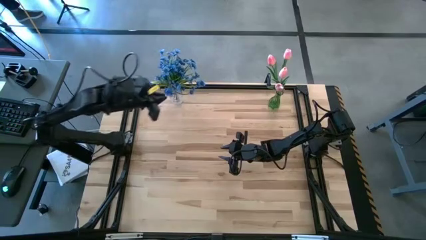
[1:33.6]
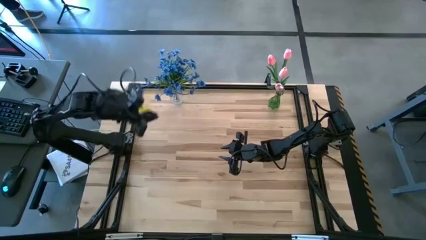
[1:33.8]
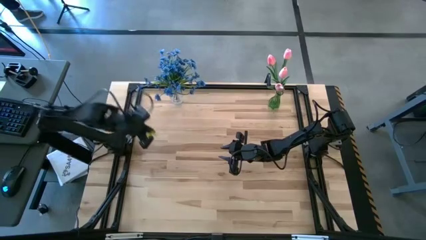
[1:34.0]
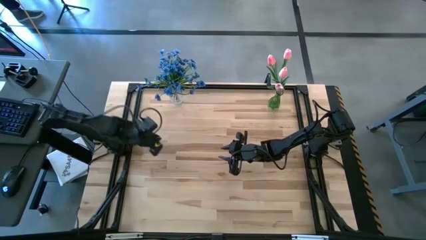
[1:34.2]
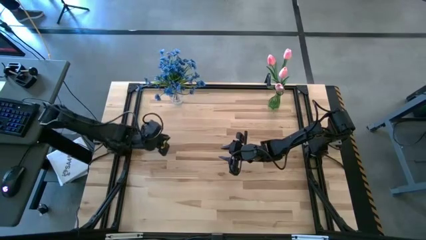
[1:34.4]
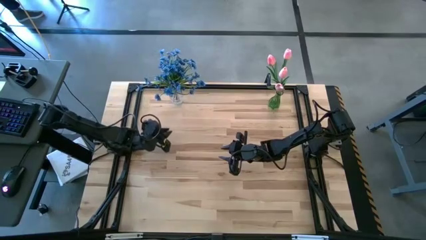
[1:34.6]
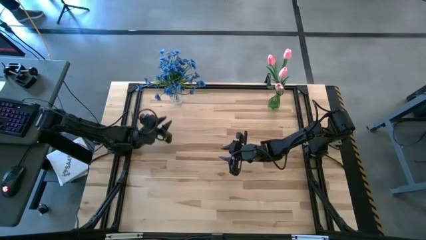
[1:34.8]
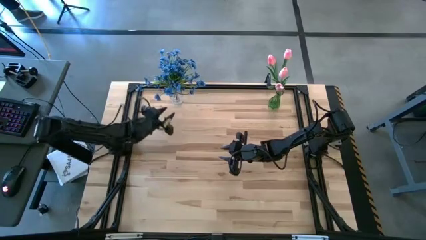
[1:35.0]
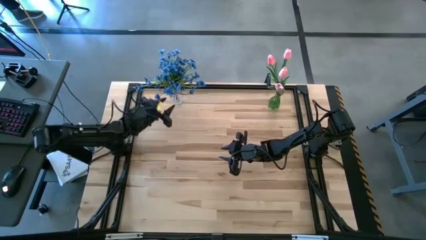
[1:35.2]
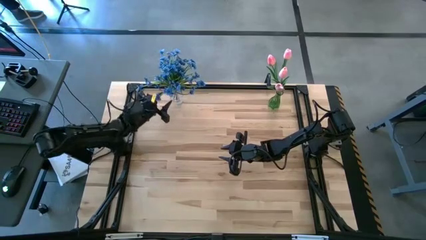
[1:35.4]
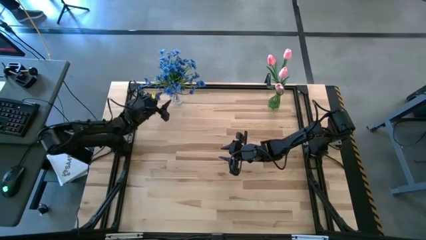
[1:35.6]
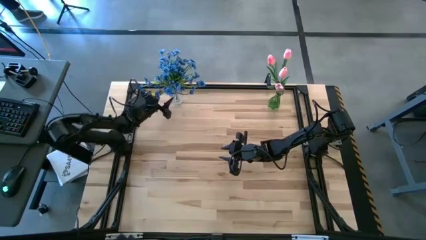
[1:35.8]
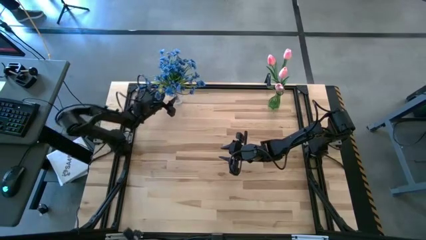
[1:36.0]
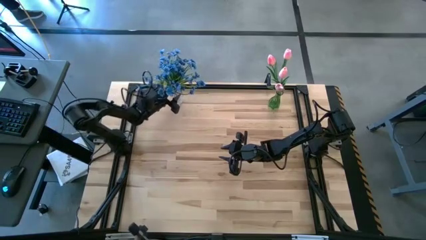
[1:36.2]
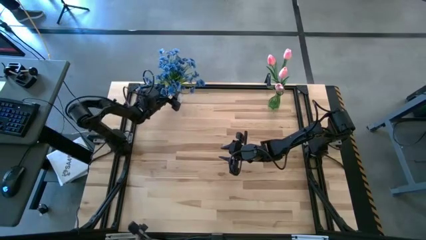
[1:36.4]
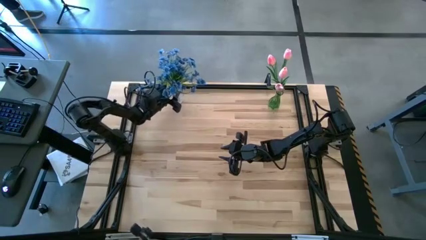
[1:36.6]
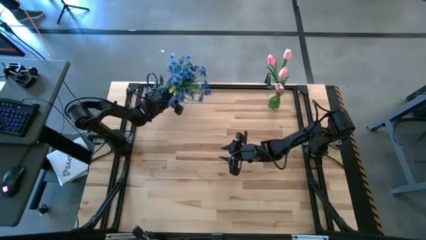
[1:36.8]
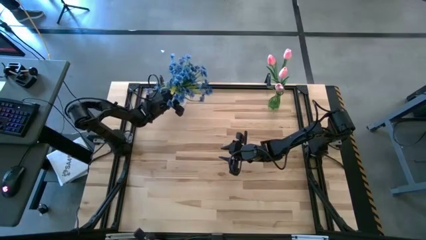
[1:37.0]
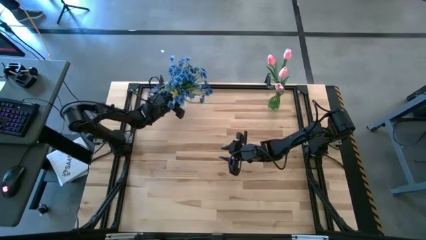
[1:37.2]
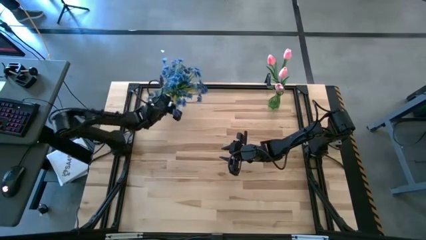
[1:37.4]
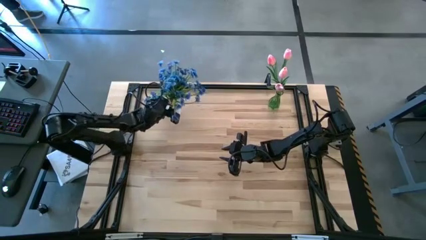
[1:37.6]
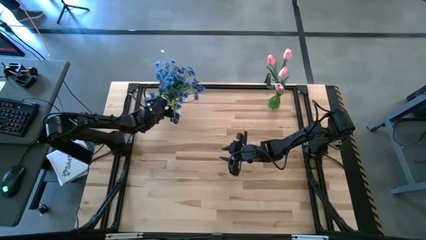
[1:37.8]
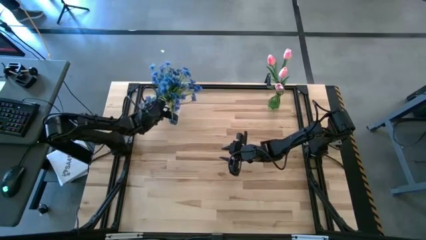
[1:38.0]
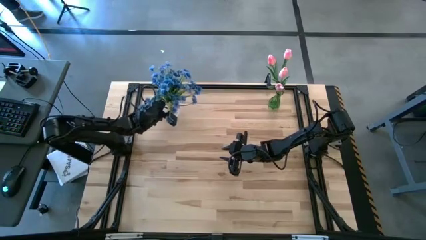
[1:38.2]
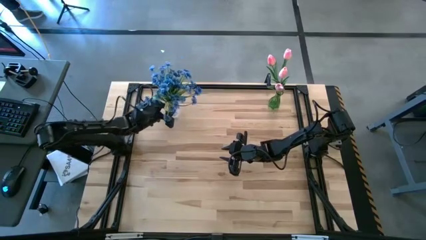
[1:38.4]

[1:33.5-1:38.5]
Task: Sort flowers into vase by color
Adjust the transparent vase

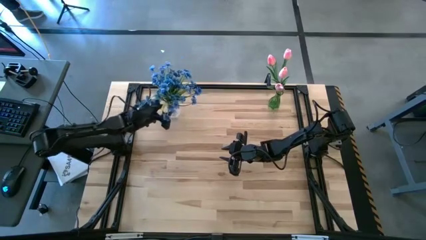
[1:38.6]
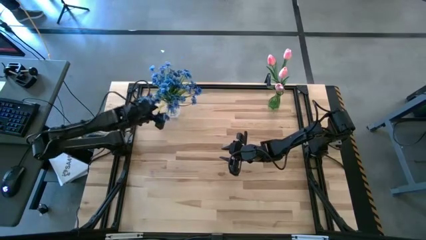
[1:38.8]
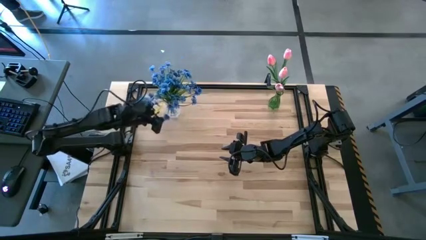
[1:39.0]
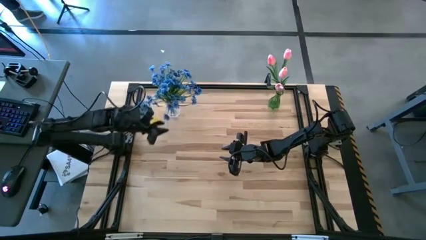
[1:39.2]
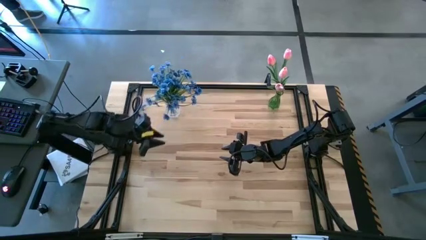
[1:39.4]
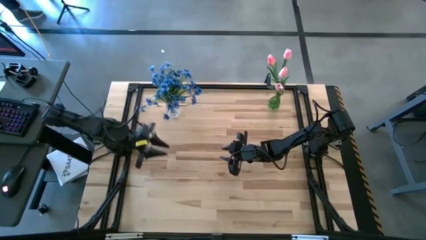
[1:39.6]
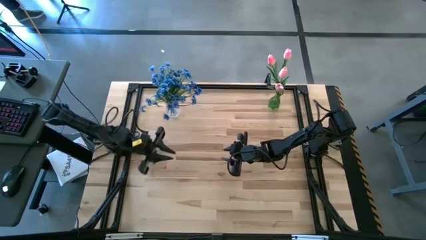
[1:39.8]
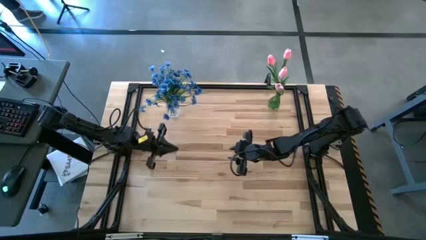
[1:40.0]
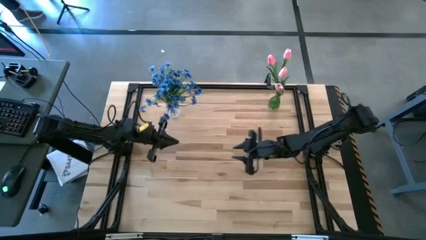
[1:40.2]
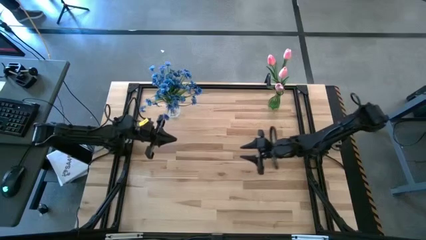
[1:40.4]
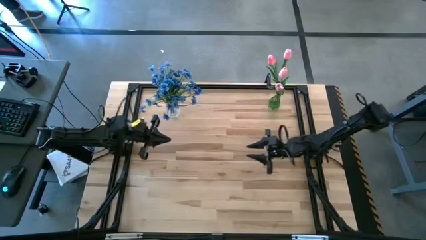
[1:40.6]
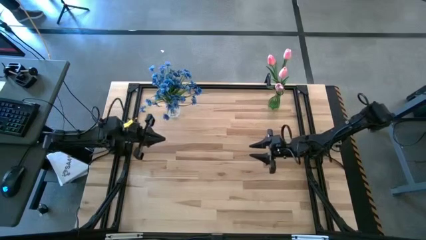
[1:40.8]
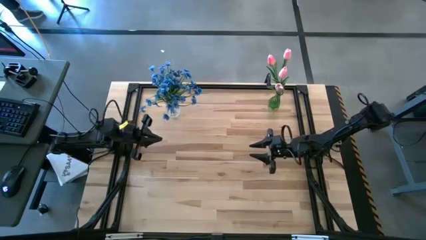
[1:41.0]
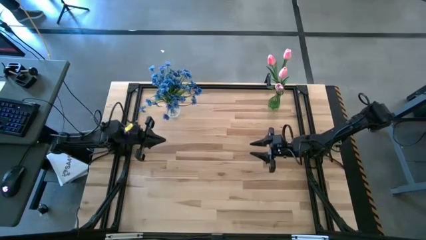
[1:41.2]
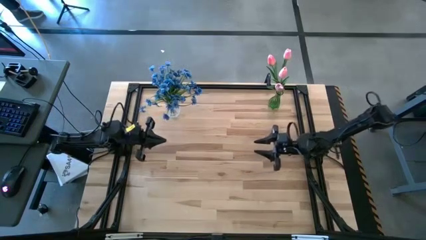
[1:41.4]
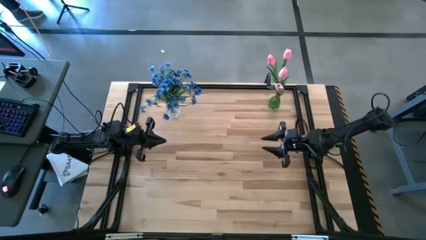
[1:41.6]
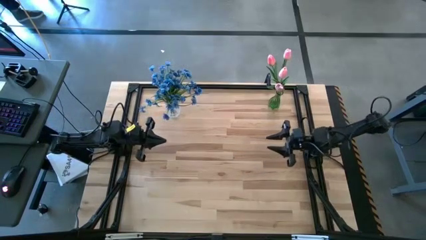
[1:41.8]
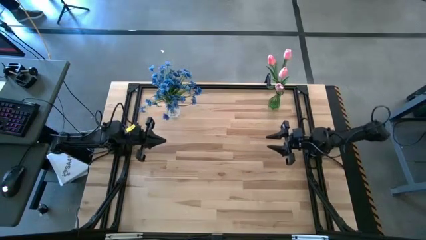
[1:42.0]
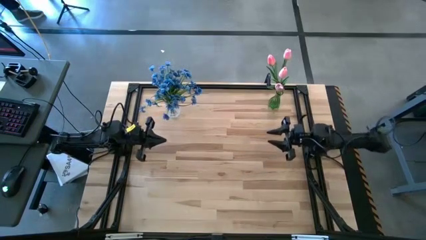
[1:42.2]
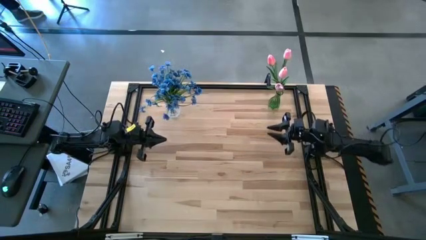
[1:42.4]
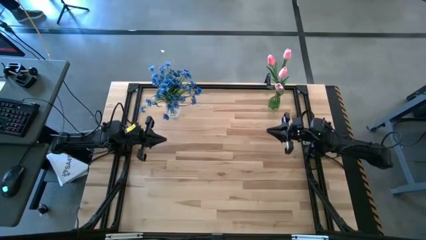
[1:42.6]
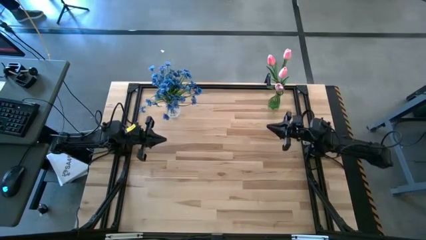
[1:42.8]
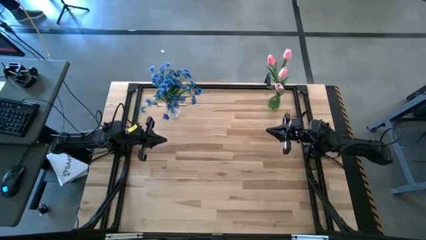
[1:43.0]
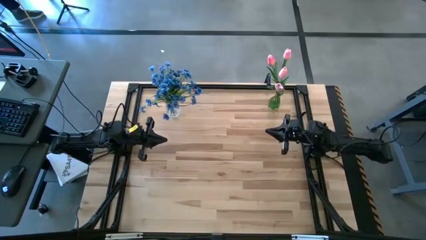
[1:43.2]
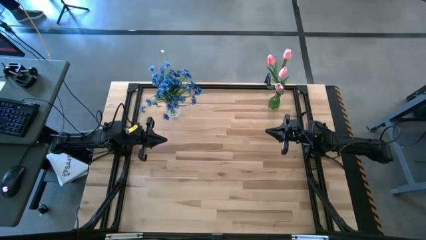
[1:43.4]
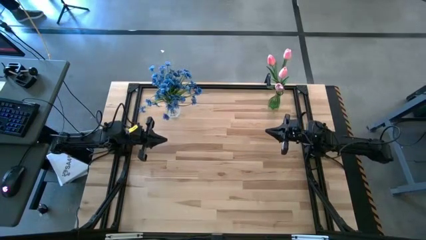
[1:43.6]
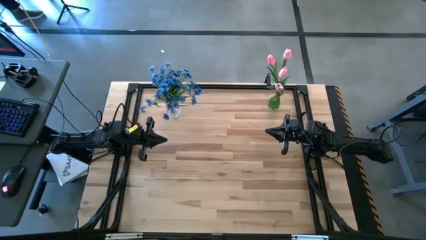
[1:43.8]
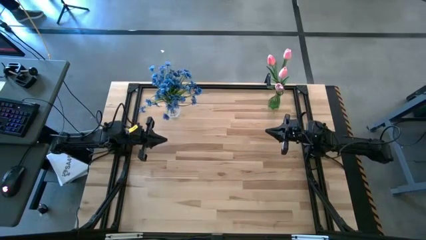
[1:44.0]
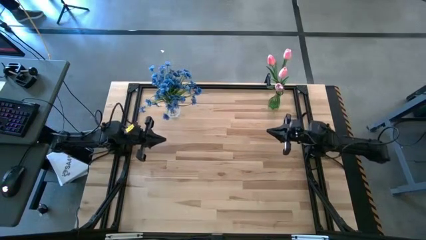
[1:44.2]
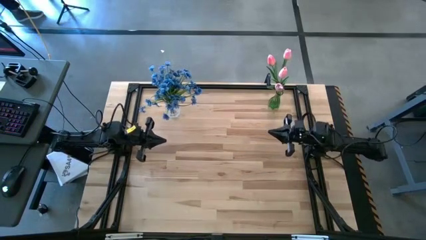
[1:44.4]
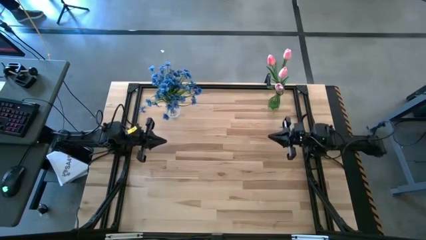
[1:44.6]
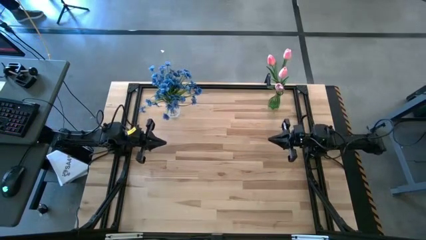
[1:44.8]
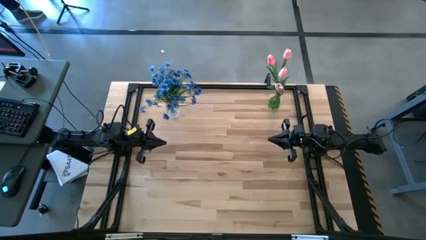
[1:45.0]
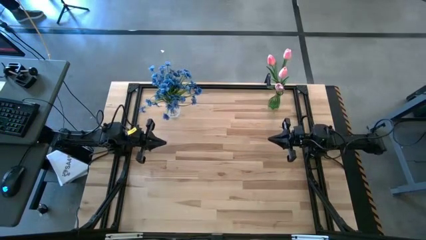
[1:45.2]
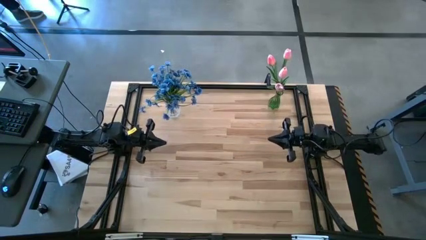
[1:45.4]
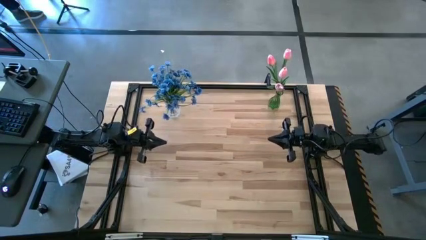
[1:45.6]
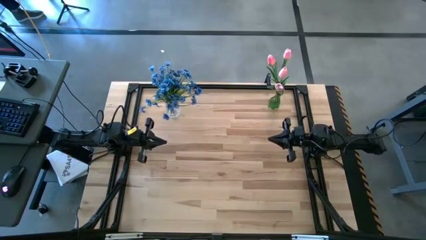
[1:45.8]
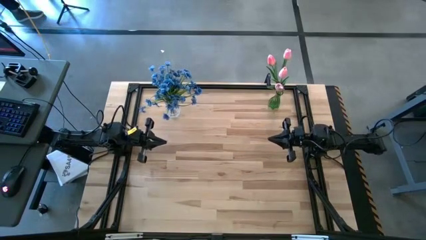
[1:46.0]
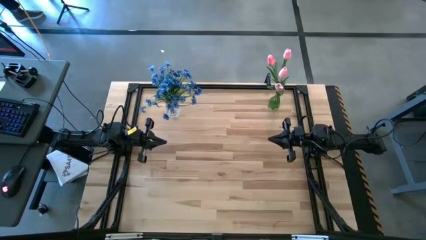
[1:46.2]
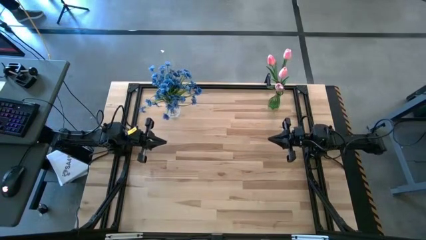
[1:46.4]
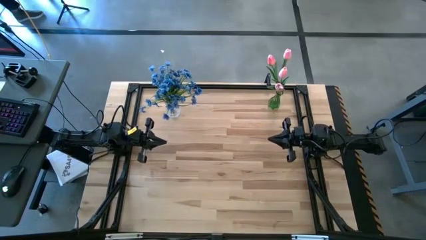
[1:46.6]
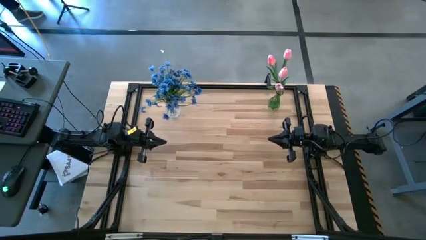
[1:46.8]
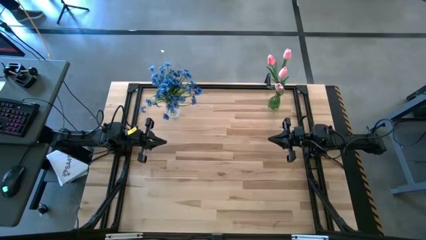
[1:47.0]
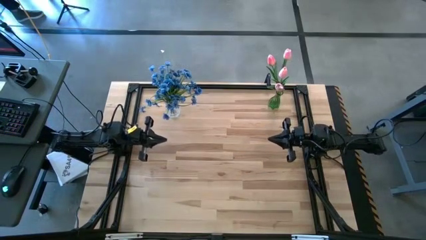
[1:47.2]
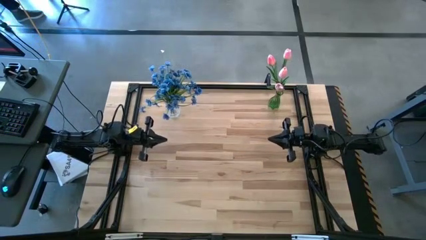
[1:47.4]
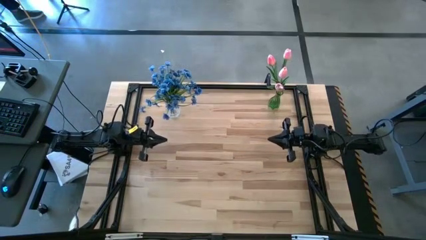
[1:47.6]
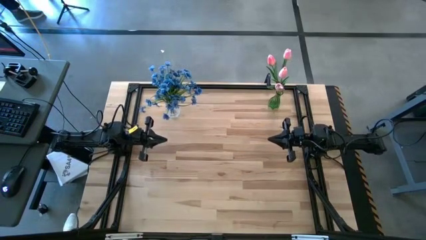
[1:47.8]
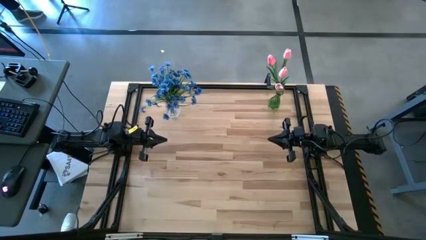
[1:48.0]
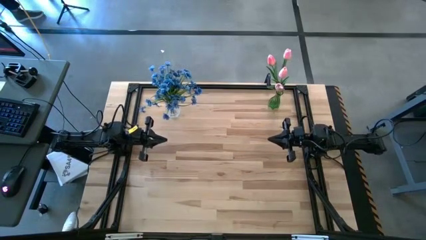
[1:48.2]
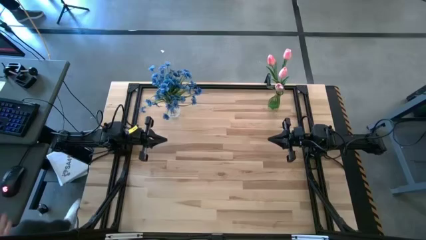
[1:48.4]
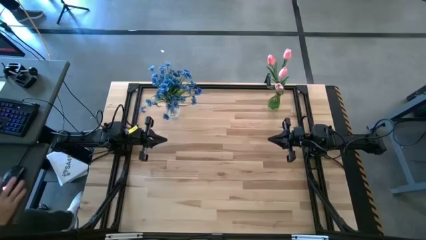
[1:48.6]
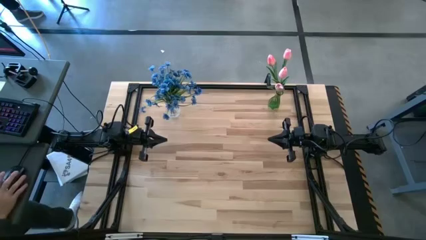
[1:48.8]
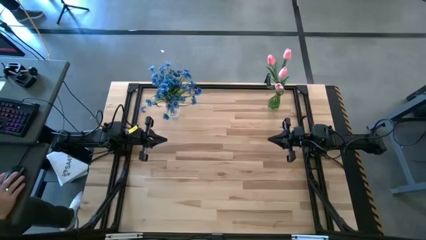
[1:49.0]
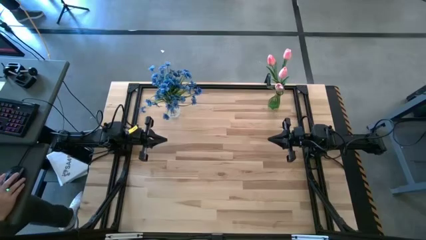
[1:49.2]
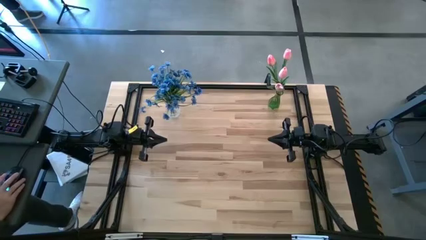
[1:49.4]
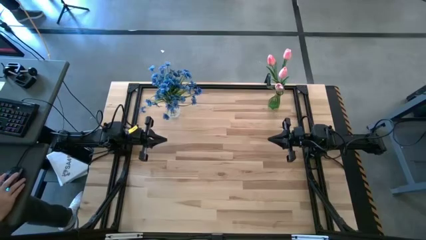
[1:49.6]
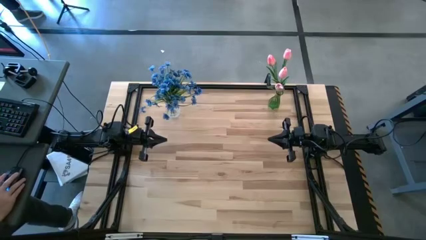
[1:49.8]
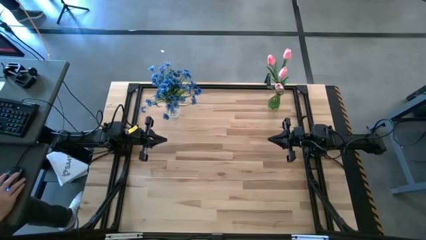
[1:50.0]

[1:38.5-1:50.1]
Return to Home Position
